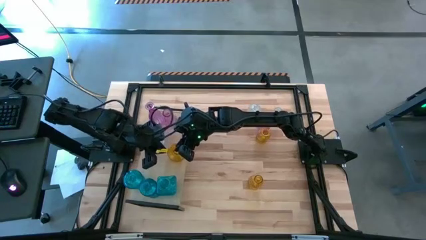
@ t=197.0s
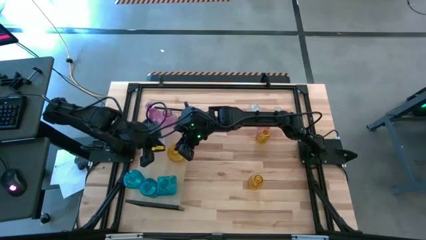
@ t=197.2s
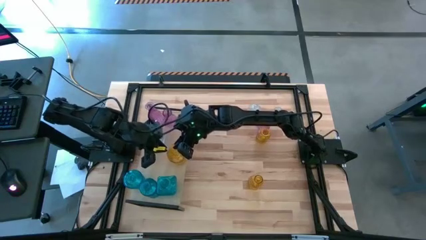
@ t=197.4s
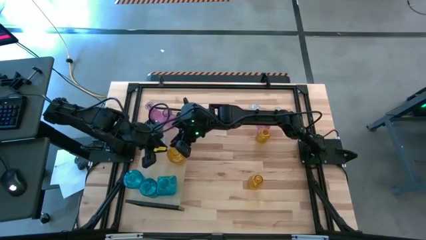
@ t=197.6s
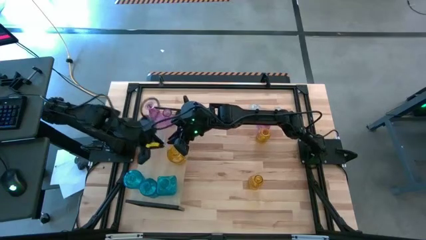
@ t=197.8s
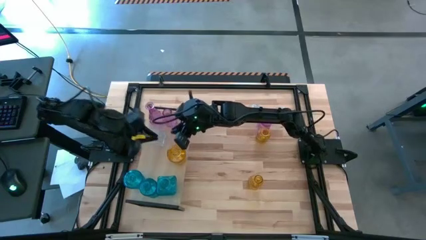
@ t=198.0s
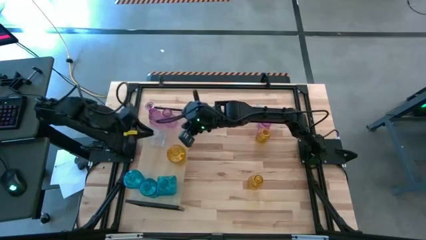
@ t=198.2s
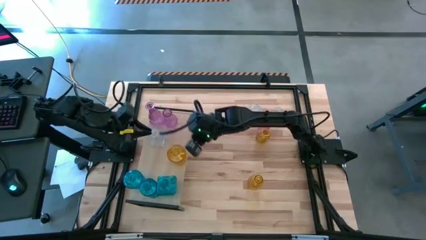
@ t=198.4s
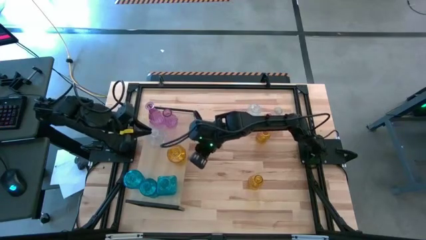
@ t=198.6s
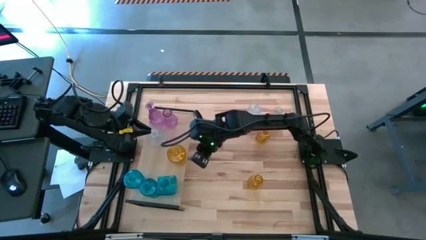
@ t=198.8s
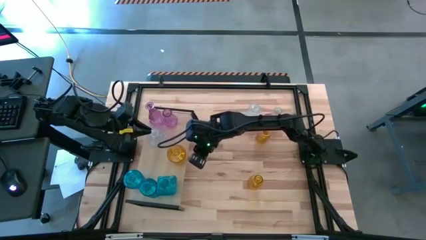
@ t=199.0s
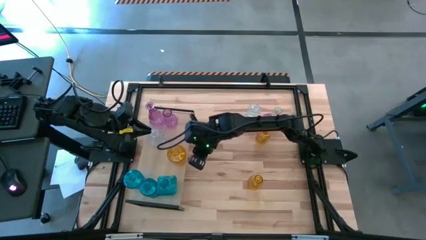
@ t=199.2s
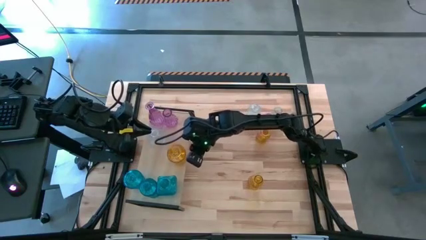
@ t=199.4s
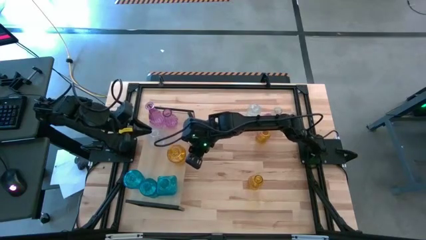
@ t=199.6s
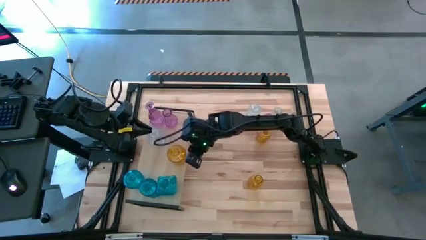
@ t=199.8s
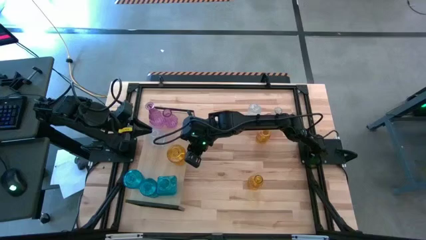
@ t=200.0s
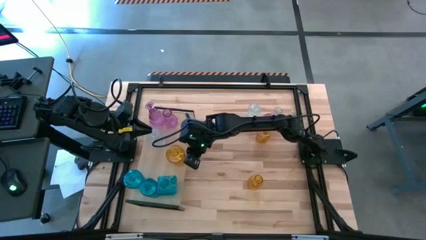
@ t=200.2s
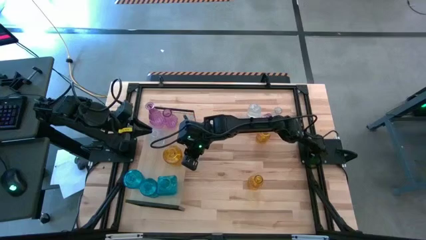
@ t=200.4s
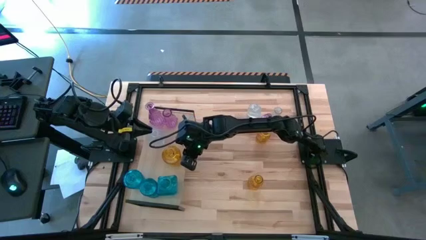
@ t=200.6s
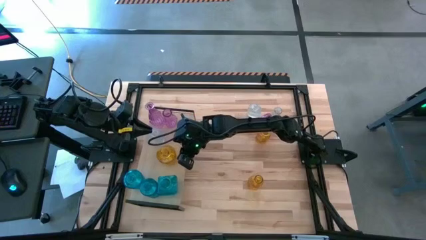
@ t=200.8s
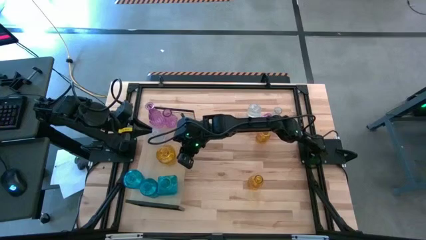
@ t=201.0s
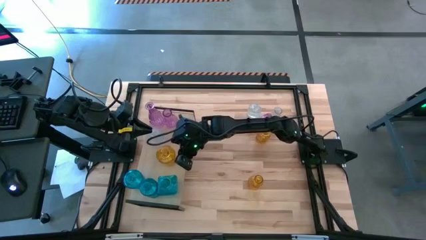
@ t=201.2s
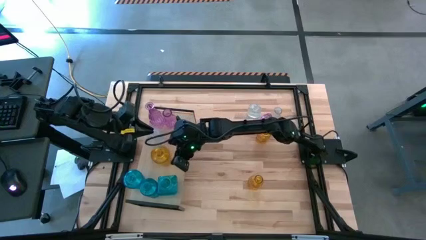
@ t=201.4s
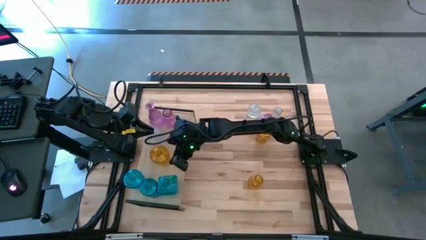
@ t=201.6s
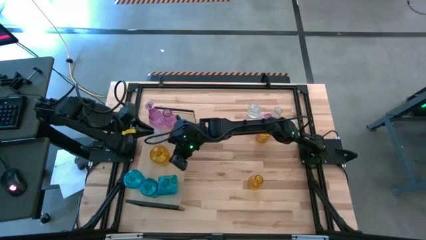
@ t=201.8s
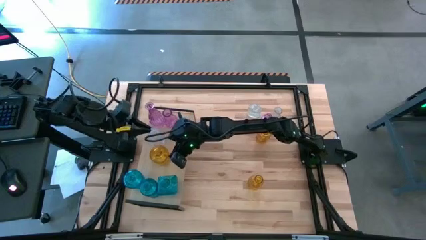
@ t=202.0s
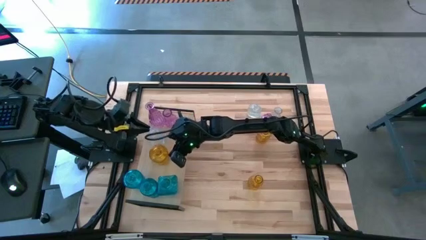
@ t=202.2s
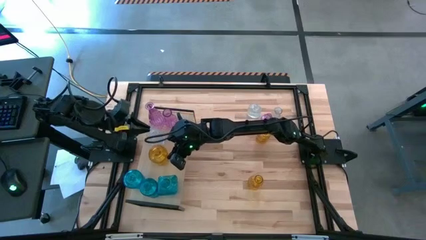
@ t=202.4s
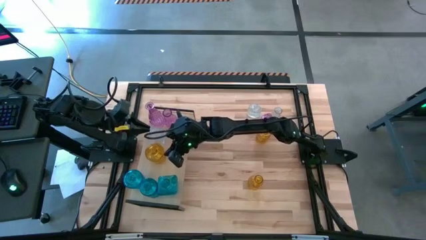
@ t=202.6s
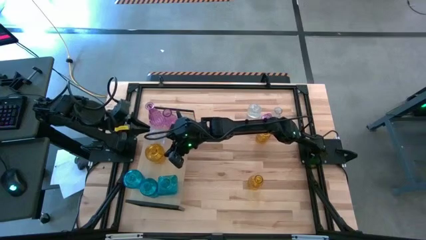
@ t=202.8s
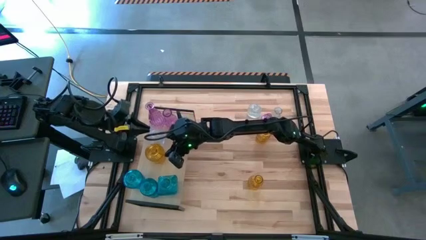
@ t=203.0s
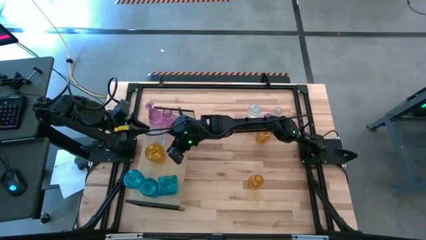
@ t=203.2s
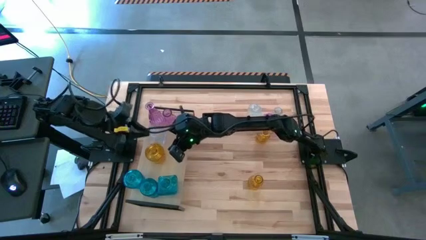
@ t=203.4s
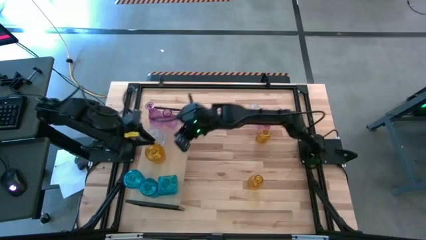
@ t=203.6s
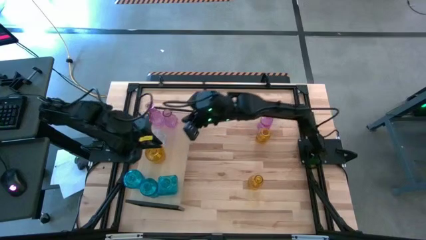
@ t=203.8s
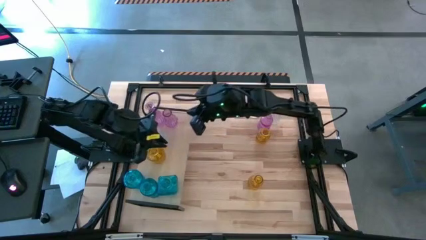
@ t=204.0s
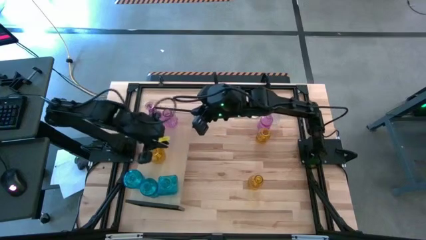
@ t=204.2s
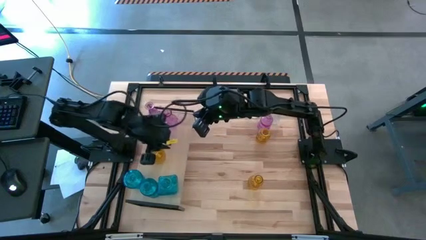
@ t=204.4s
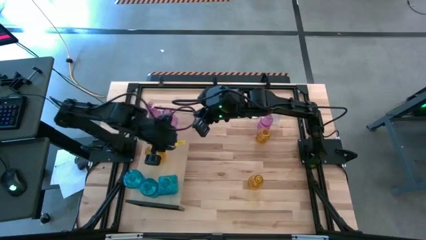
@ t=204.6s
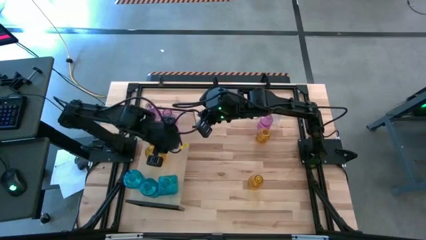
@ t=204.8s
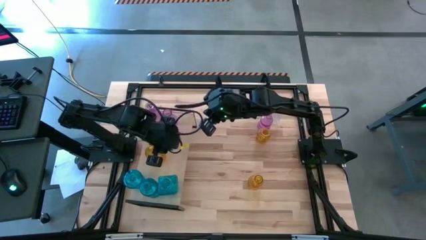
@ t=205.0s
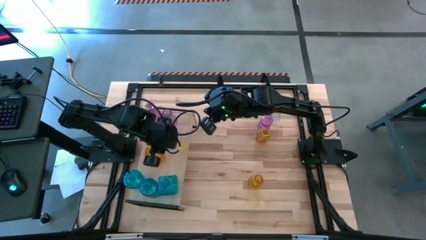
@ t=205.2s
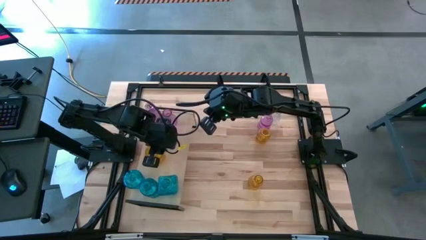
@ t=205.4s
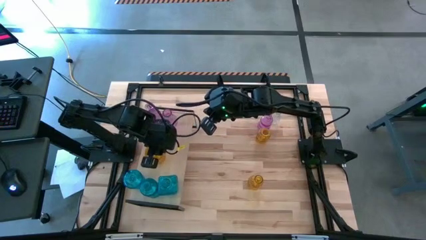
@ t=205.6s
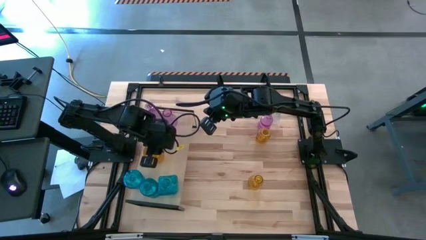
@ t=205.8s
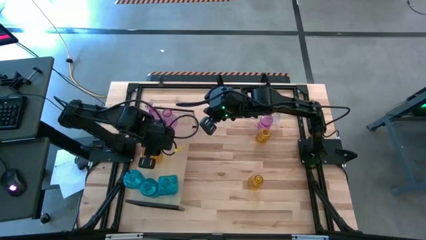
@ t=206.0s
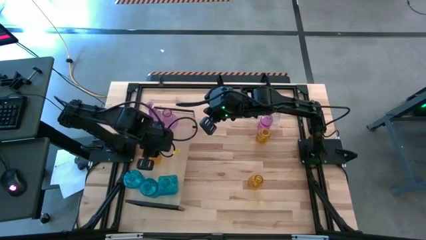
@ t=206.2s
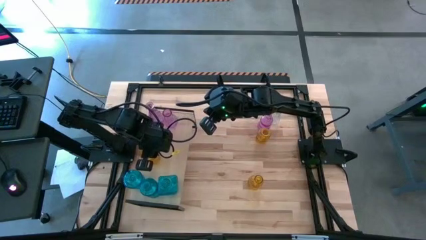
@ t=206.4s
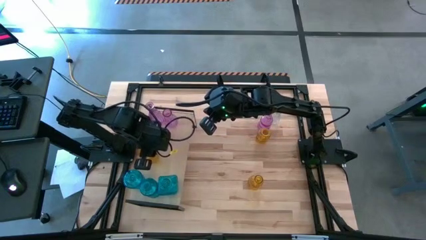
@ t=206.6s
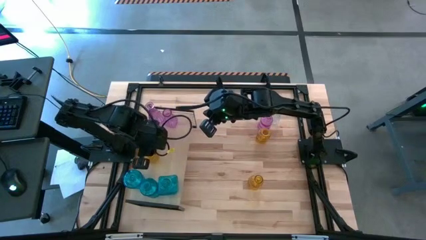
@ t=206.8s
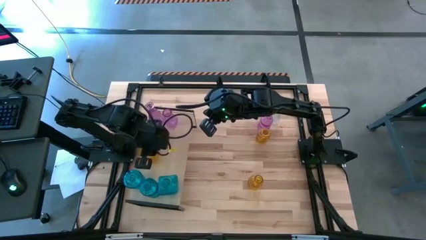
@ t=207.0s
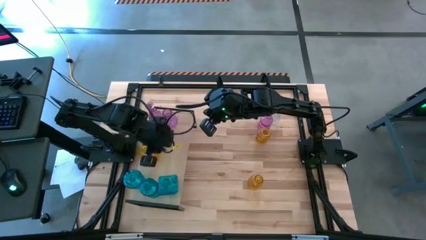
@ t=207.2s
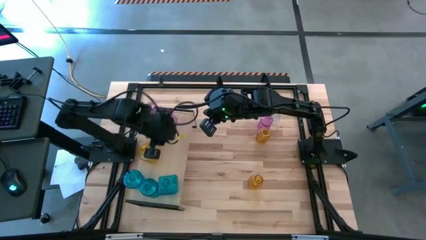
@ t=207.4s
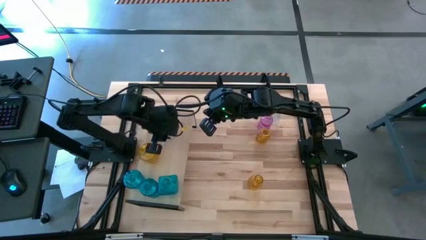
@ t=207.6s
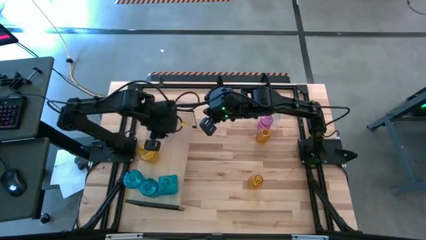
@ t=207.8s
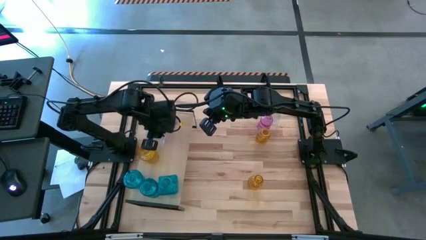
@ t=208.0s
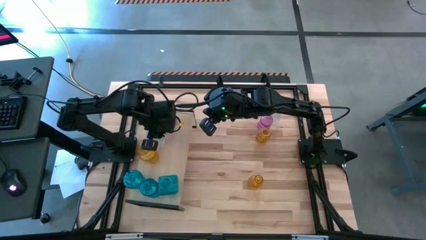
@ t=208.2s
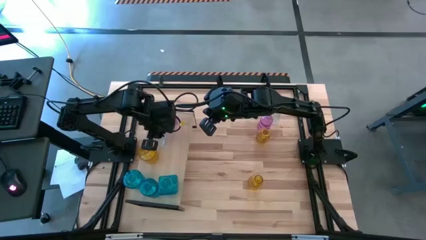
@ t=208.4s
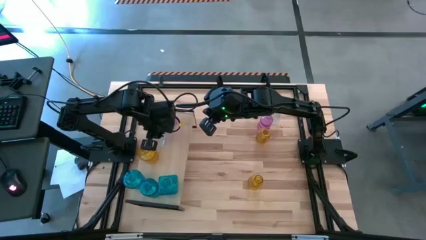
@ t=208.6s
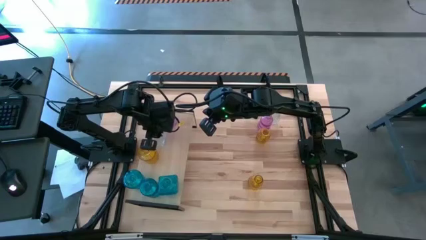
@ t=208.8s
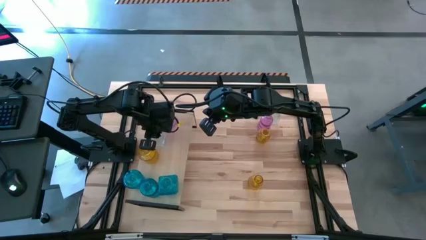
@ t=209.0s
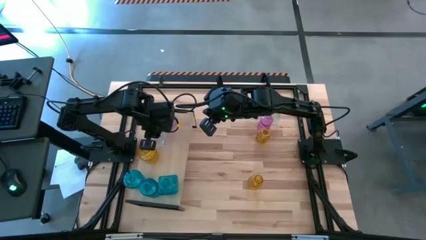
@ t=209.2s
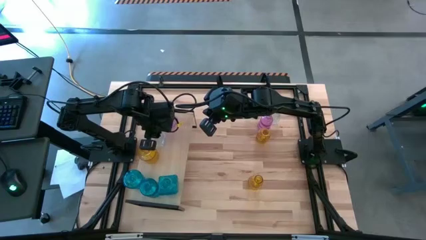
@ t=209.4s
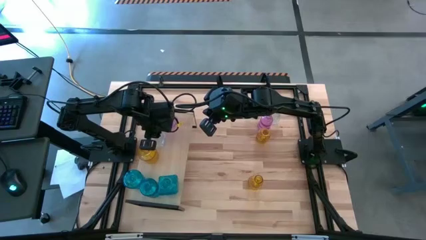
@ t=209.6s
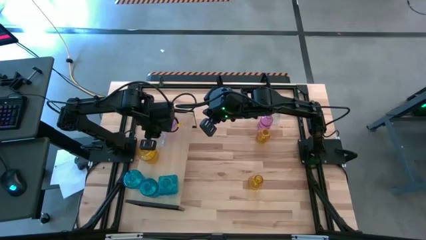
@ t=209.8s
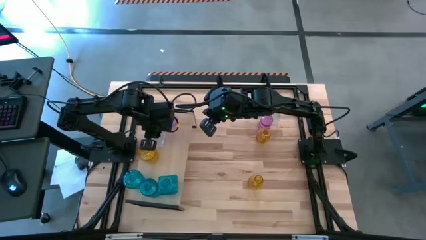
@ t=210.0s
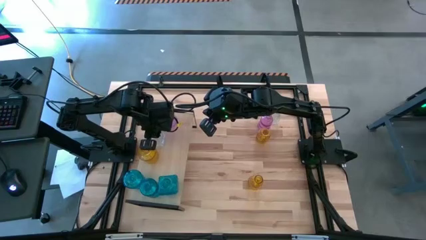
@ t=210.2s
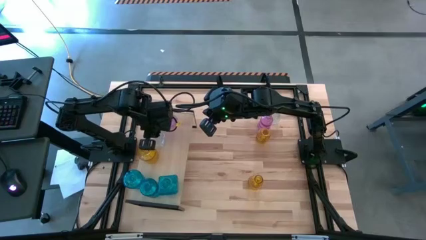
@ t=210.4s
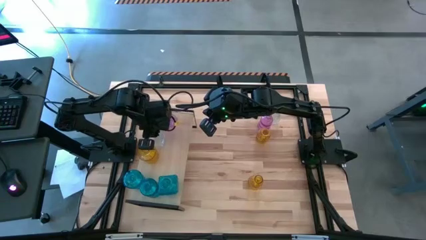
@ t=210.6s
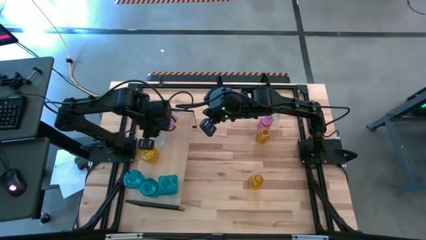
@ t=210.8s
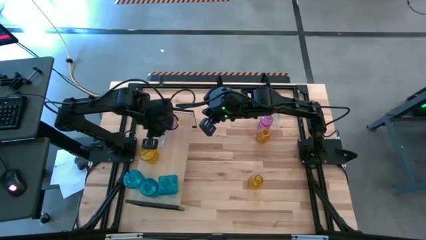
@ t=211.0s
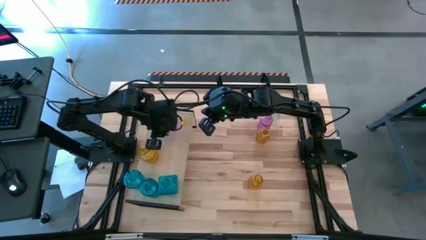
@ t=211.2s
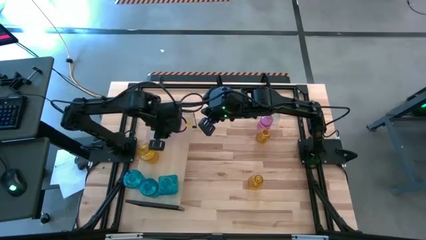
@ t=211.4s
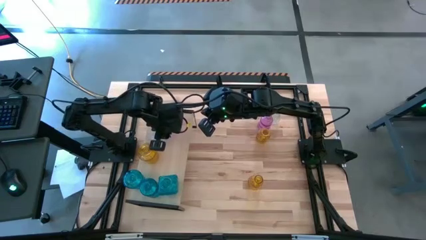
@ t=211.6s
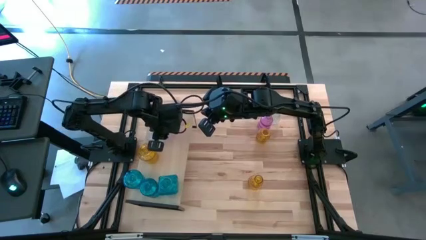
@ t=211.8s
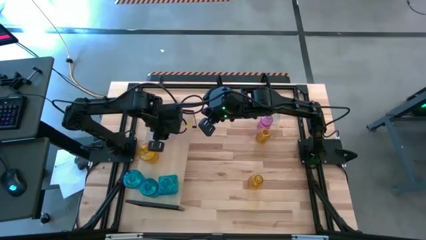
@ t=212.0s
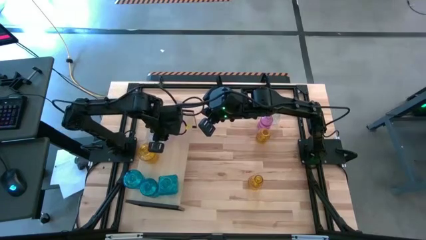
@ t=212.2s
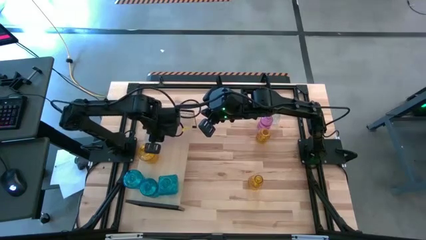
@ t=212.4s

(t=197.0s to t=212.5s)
Task: sort vases onto shelf
Put the top left yellow flower vase on the shelf
